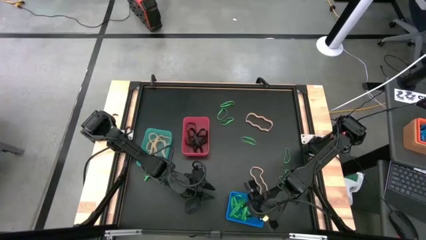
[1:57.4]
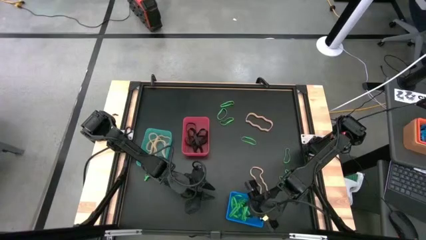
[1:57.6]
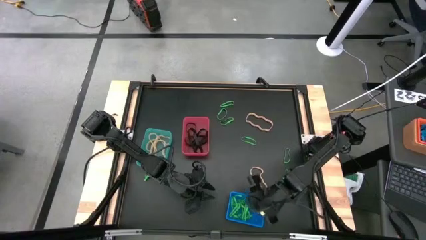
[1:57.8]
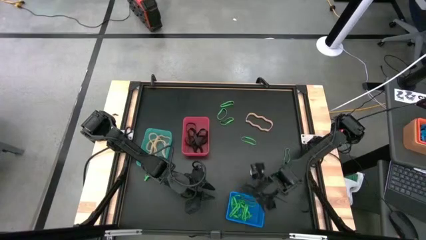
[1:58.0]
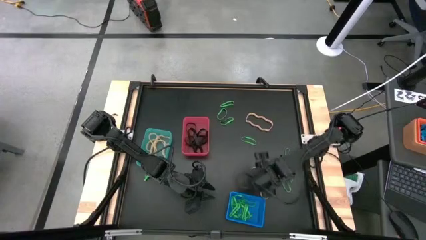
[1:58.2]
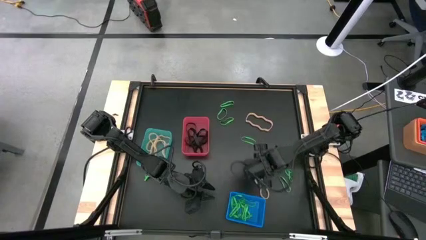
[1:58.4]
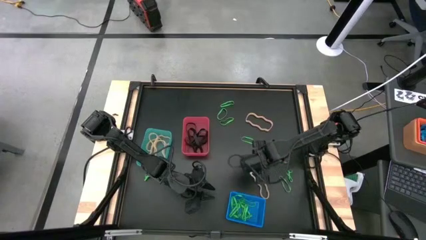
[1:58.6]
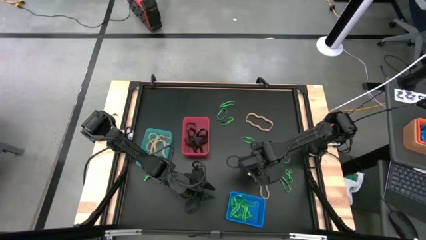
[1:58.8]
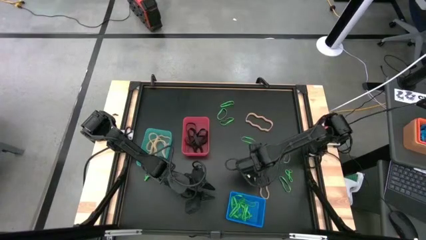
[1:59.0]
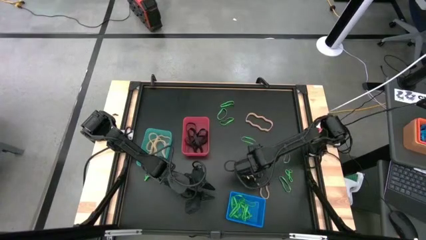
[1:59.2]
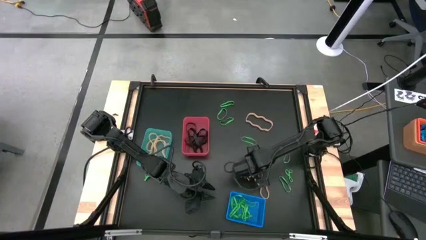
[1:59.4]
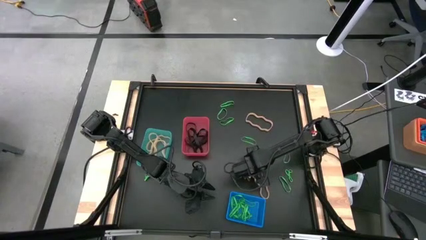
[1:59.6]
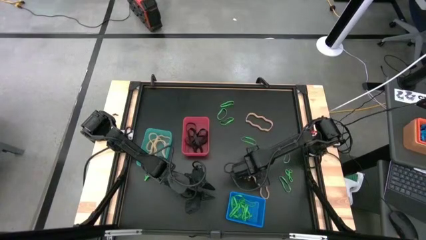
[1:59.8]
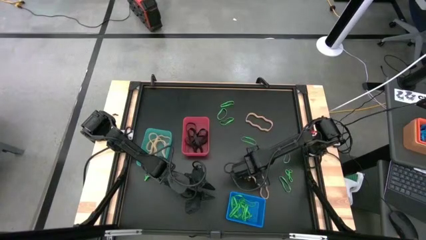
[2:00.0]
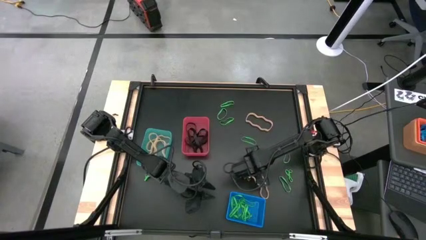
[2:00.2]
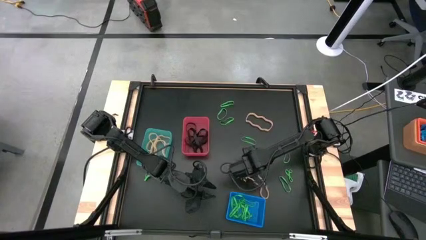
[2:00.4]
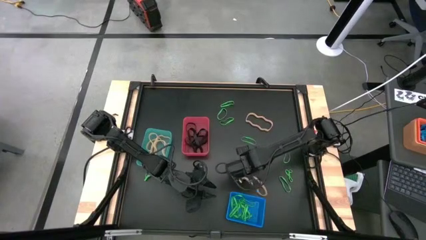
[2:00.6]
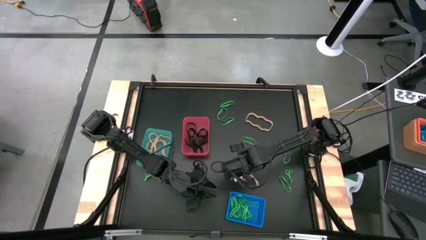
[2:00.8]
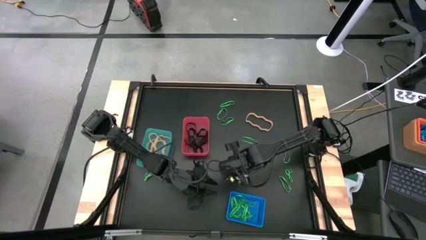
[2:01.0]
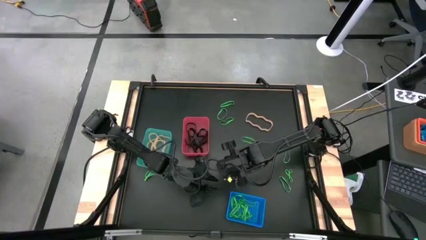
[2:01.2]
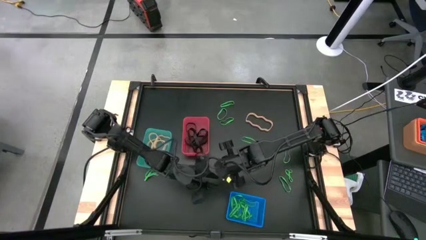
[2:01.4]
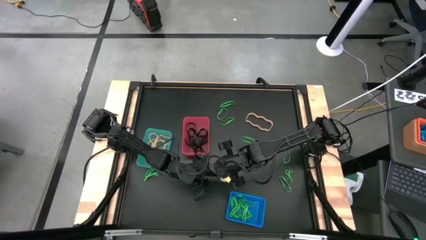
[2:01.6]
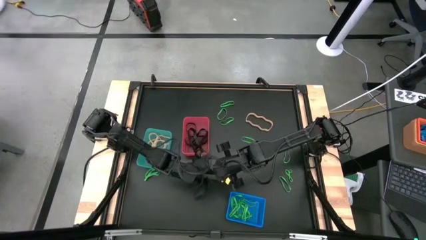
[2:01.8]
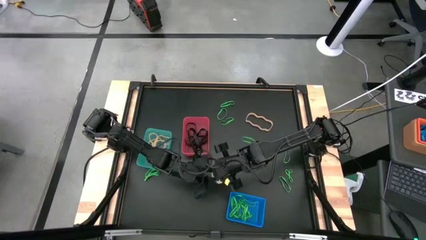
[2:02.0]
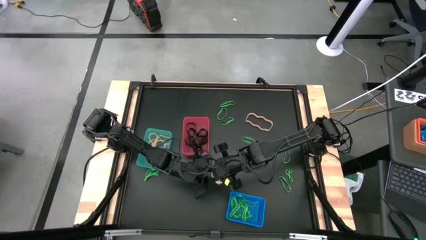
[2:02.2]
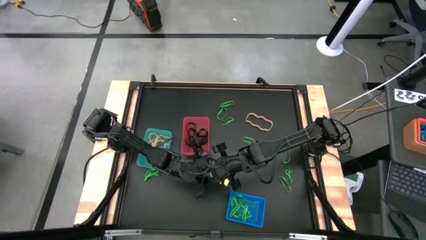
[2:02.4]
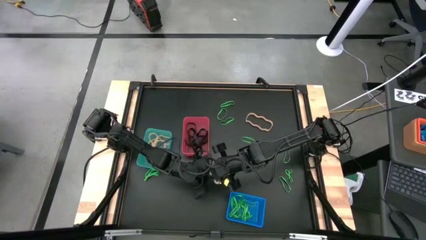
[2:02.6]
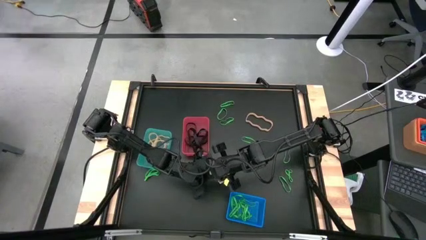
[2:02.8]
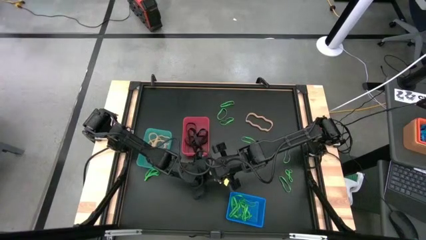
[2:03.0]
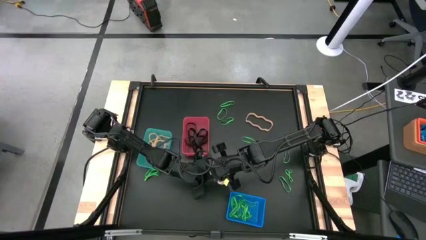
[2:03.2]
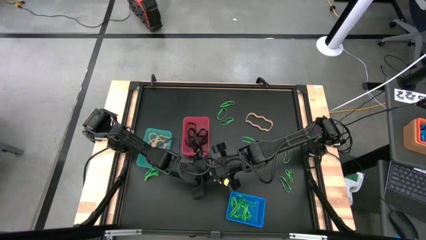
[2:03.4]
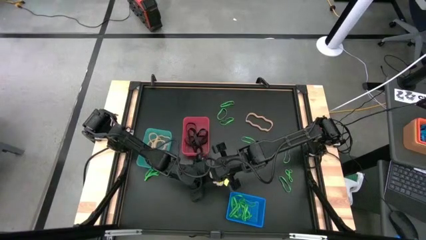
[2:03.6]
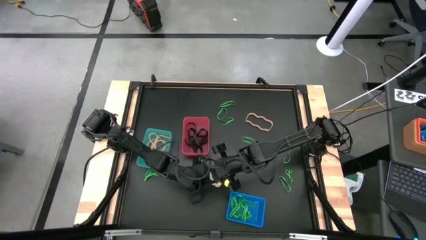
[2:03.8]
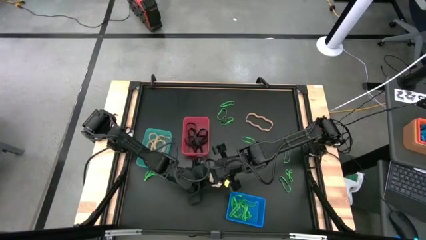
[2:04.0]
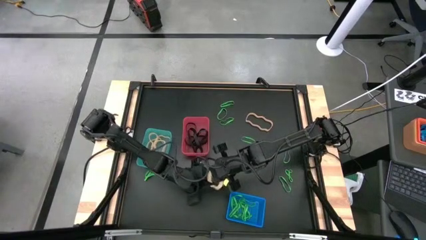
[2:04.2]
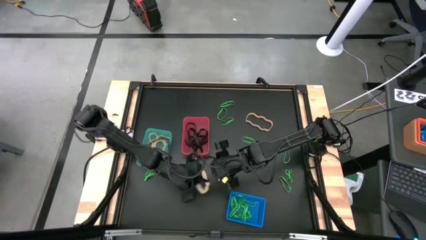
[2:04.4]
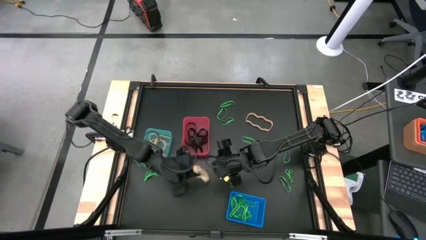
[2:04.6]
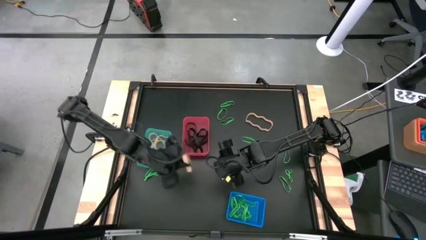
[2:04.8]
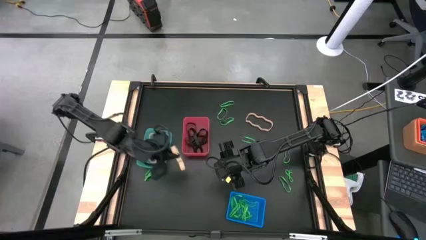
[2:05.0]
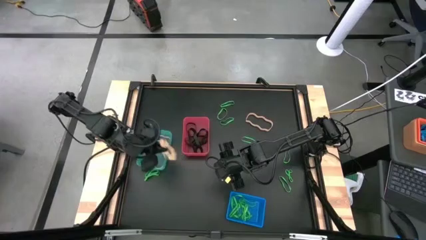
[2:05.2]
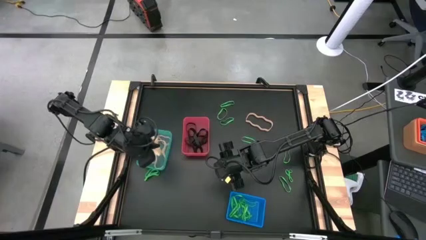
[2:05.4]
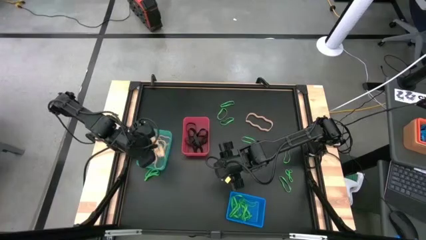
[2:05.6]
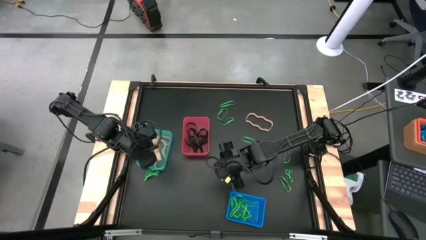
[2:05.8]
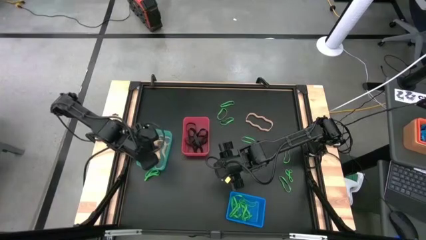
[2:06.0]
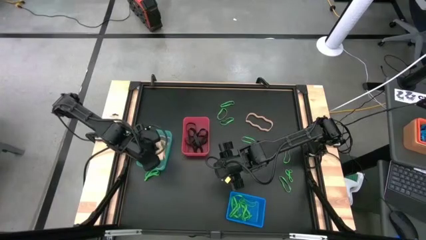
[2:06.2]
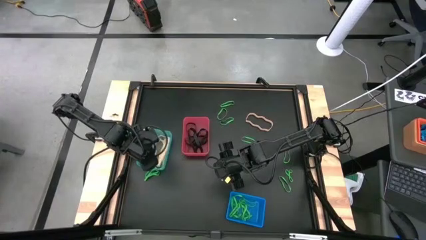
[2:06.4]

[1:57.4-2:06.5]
Task: Sort rubber bands into baskets
Put the light yellow rubber band into the light blue bin

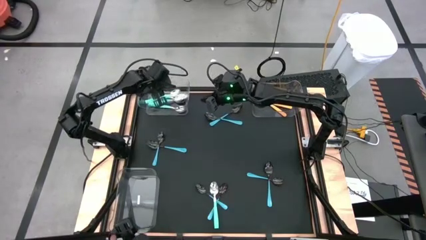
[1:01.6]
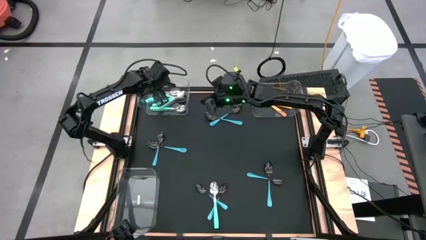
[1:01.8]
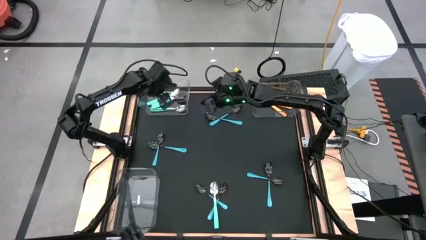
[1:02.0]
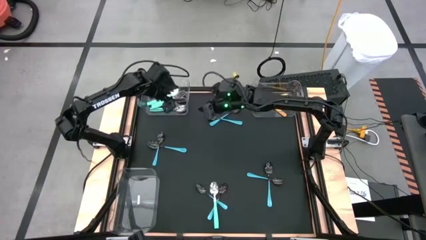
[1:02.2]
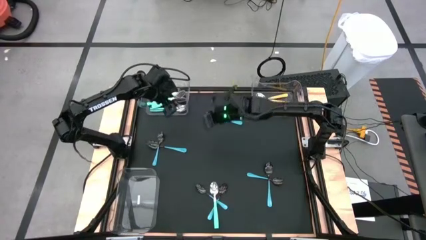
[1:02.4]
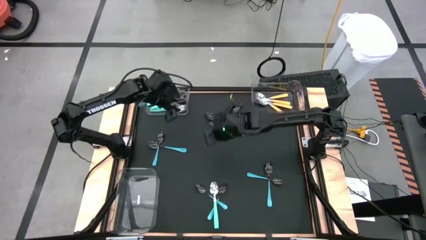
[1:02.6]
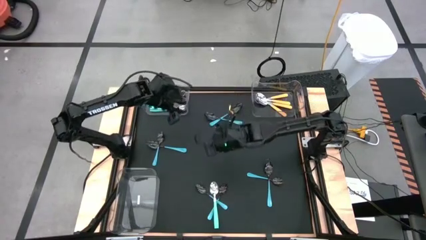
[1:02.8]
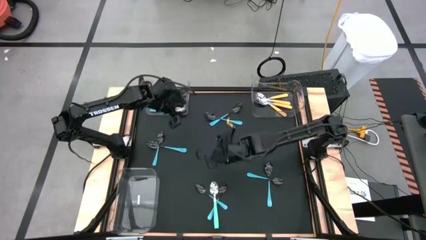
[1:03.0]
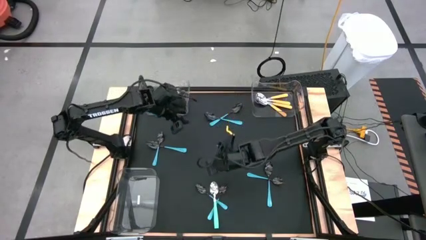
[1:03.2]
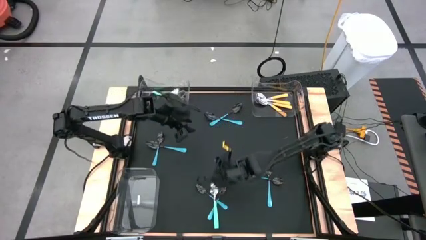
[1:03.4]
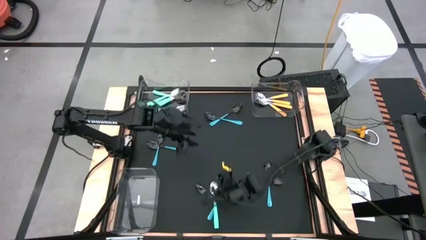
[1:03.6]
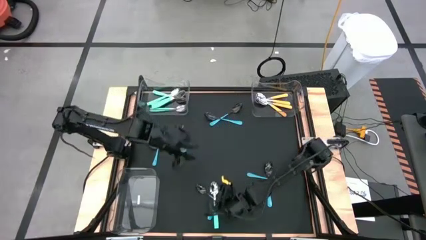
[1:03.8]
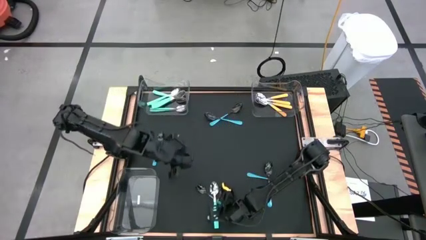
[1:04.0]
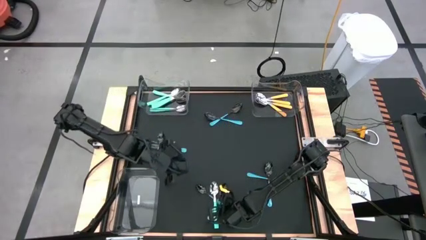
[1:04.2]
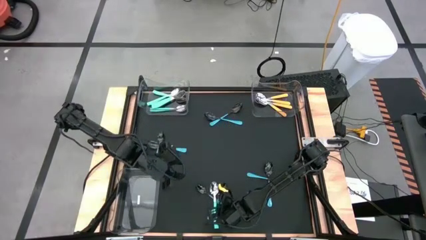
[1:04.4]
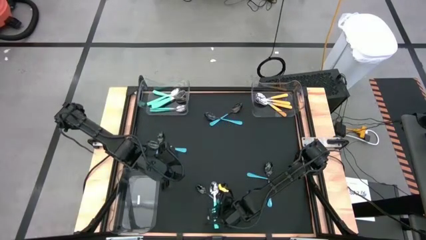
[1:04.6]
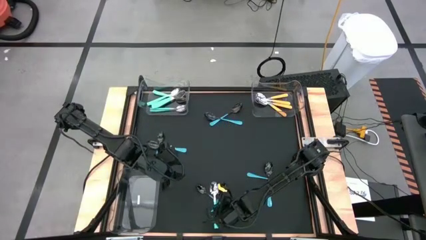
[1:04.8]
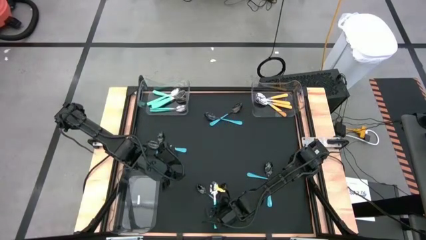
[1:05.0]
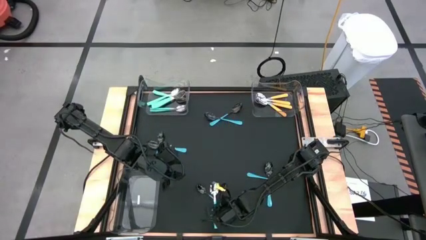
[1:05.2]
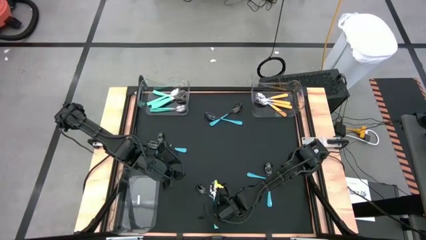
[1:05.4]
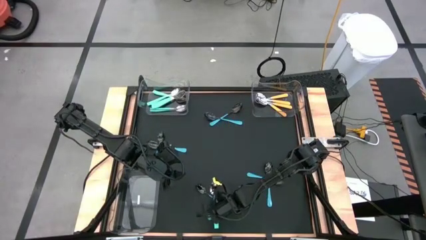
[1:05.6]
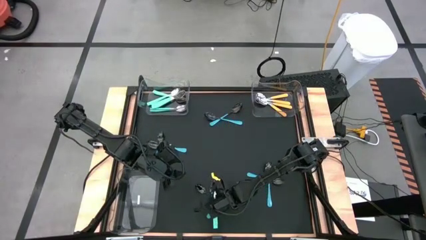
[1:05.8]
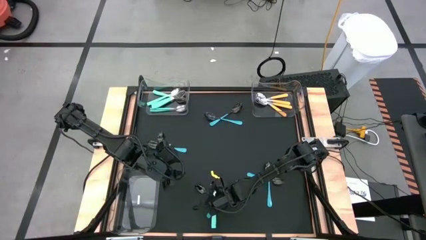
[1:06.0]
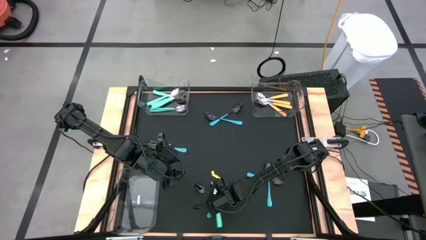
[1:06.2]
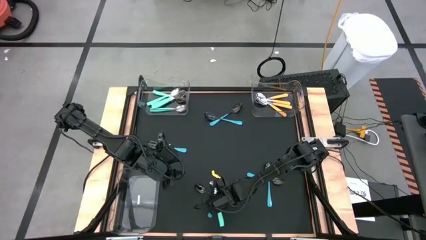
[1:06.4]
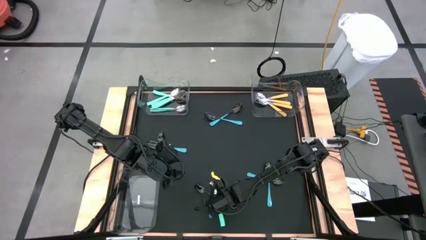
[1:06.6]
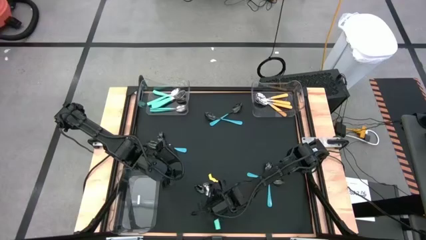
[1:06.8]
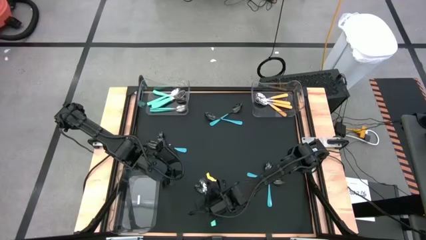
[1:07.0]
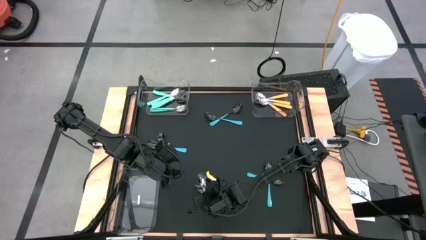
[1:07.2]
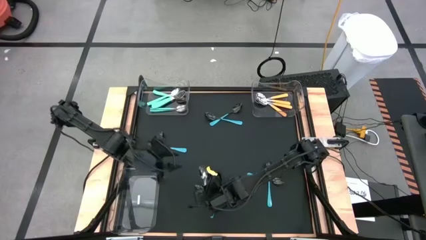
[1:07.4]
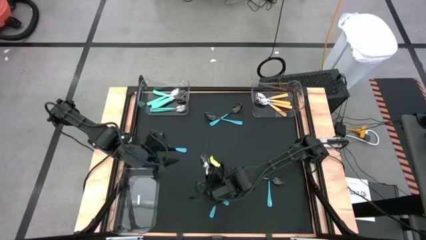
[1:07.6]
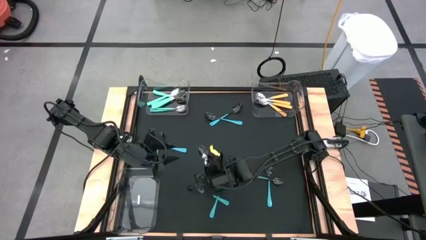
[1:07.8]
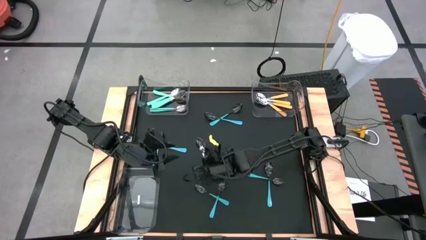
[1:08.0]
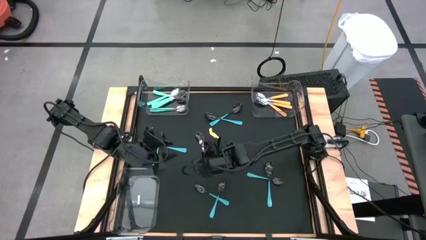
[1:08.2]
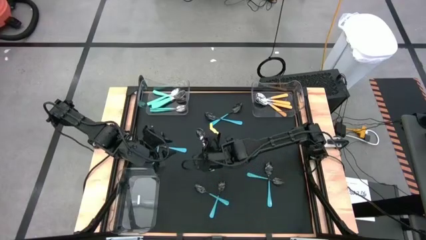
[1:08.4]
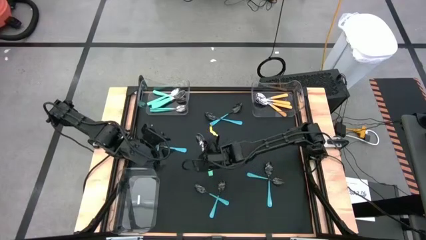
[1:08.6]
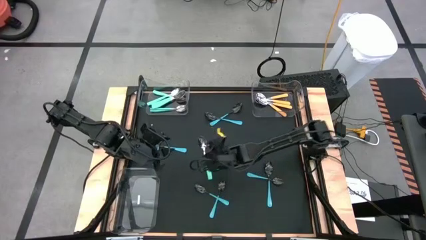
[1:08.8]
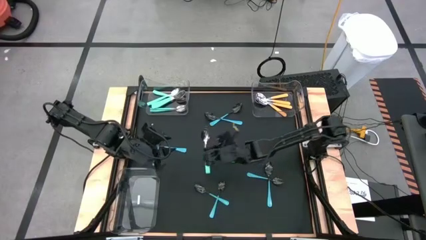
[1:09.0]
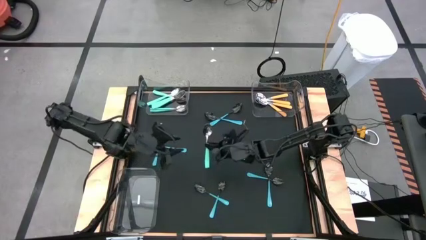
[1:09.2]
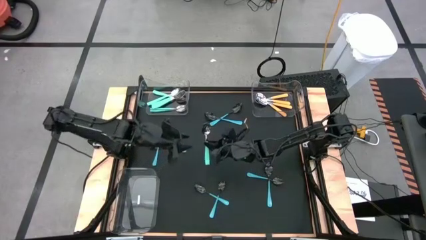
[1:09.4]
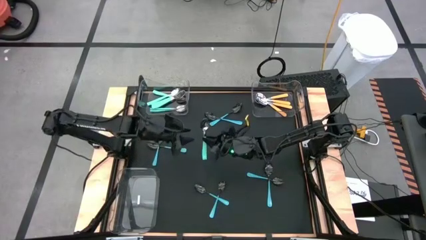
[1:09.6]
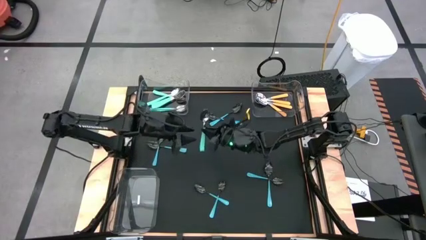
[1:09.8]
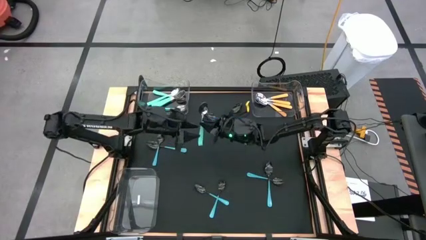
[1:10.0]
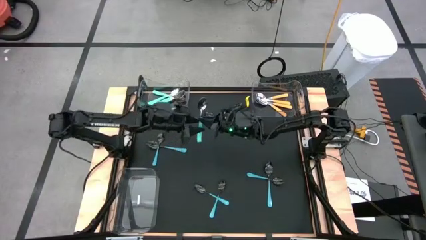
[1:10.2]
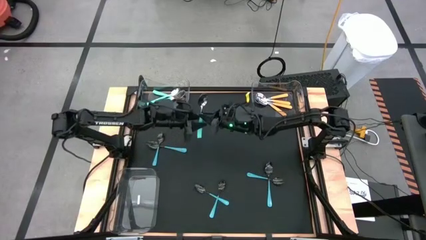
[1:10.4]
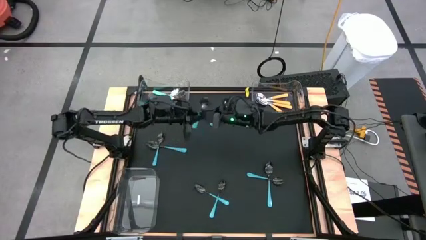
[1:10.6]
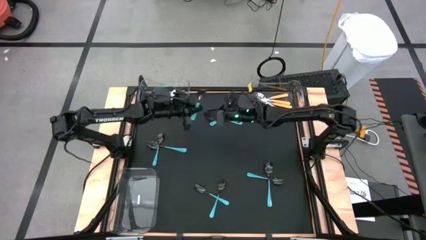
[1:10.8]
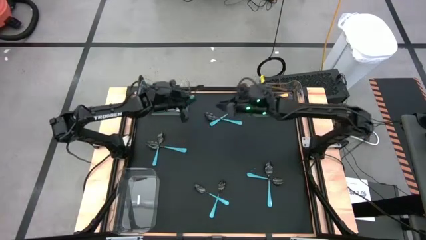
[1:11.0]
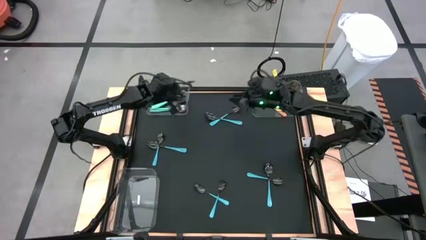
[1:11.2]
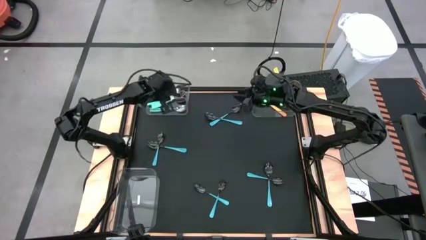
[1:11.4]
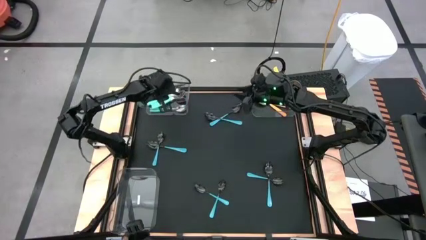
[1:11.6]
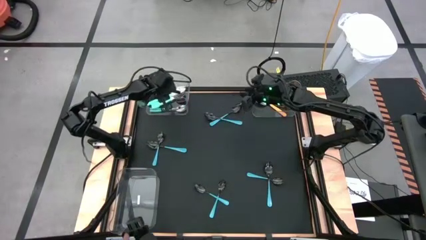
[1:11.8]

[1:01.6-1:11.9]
Task: Sort silverware by color (type)
Put the light blue spoon into the top left transparent bin
